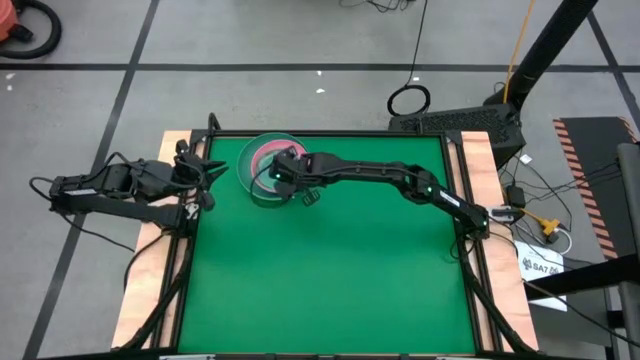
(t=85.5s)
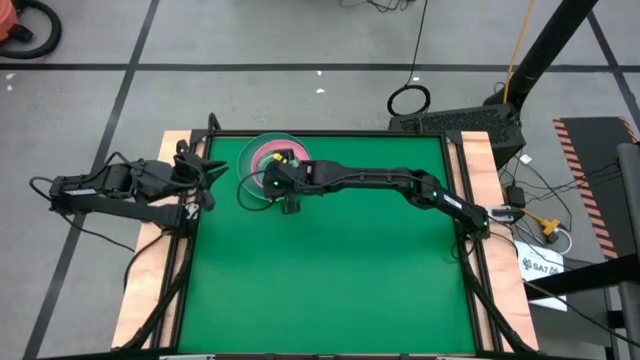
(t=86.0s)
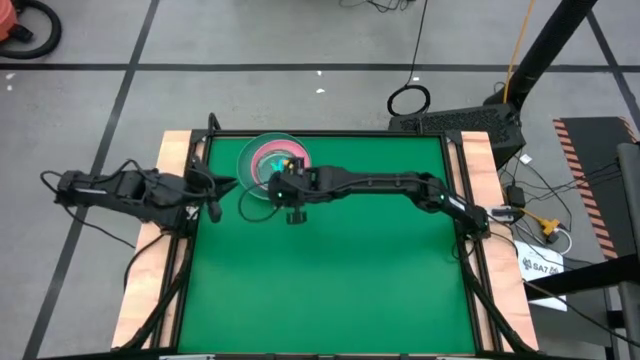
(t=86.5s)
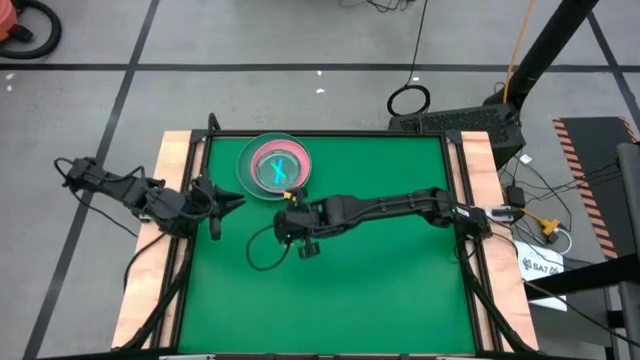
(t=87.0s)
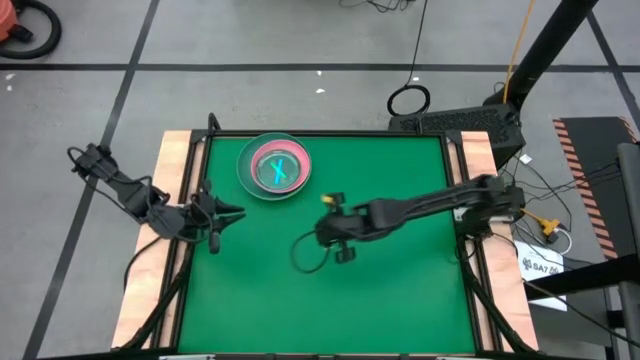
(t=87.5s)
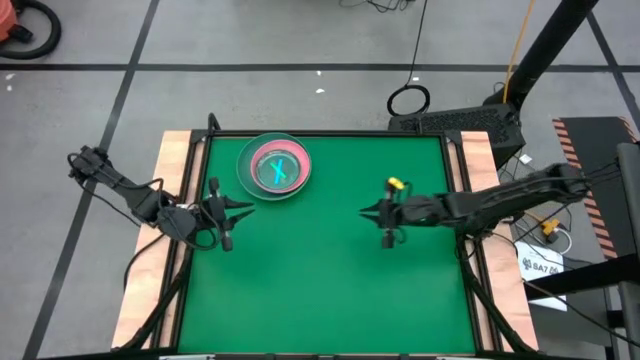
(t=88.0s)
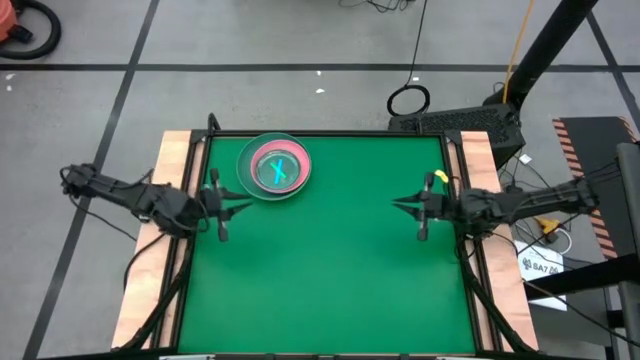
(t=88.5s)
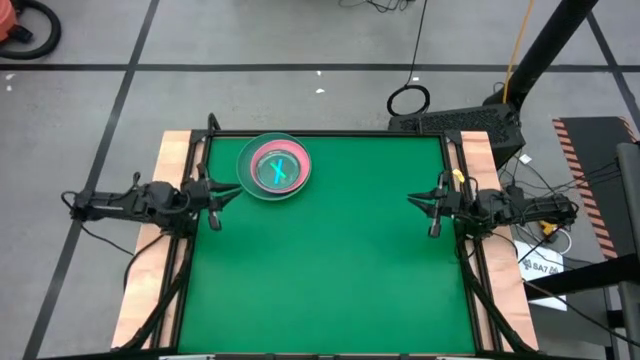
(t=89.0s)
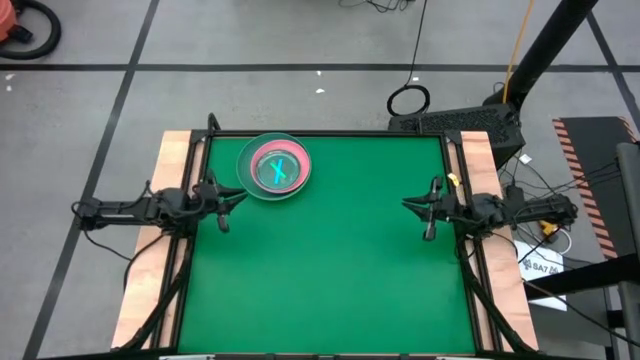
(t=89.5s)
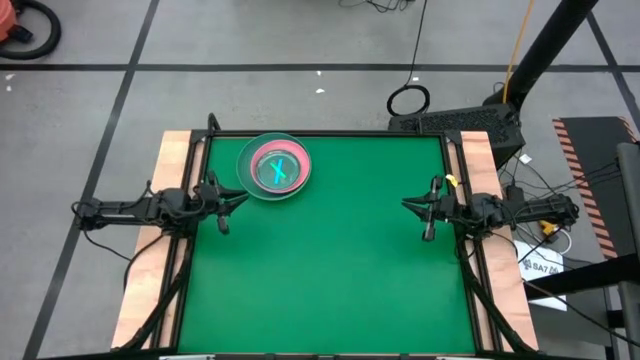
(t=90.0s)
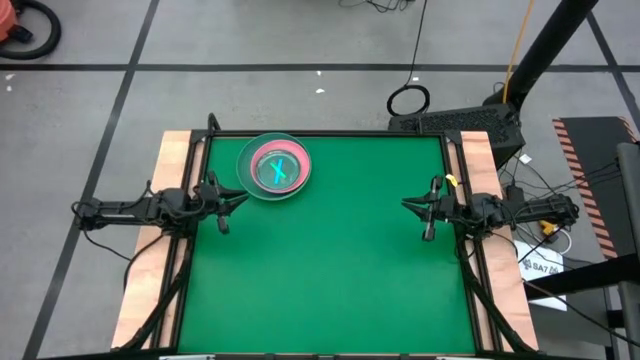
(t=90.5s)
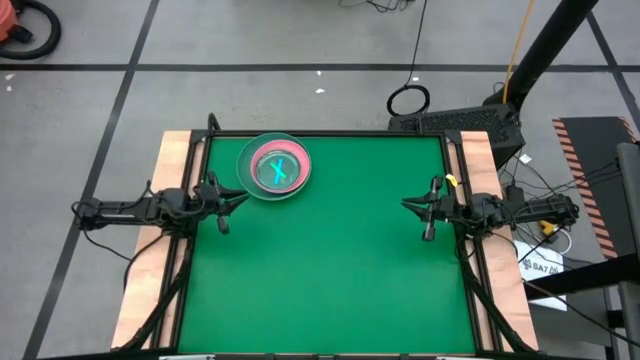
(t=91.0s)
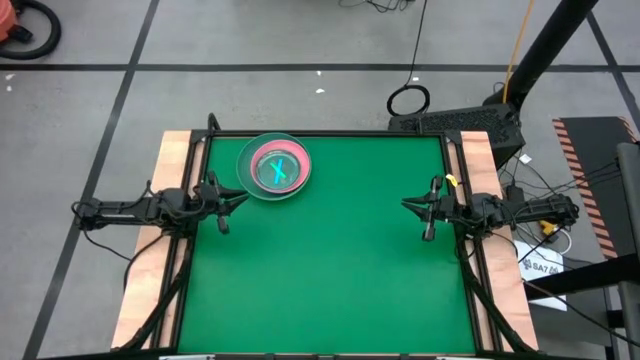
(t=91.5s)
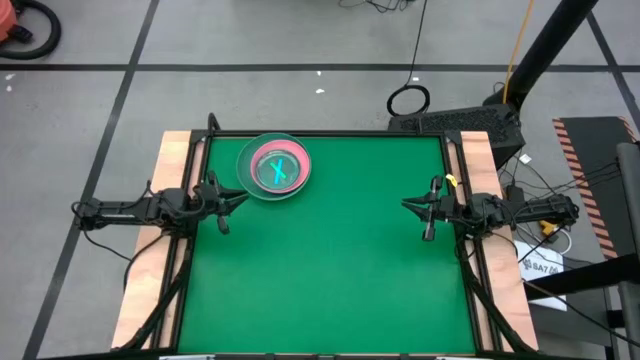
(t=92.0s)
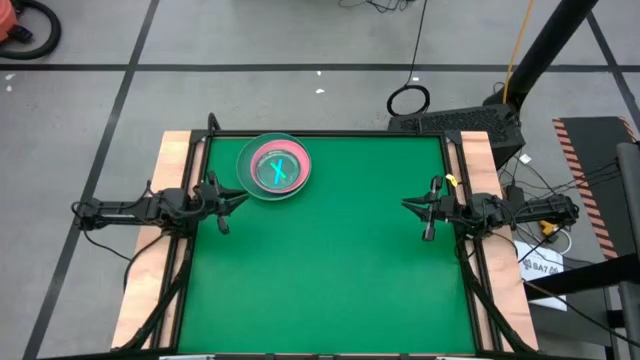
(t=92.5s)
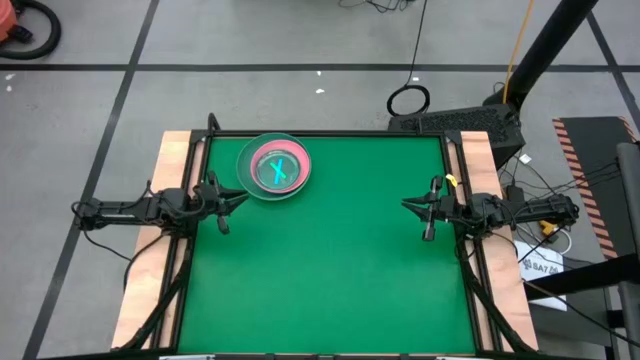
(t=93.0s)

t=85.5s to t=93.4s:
Task: Stack plastic plates
Return to Home Position

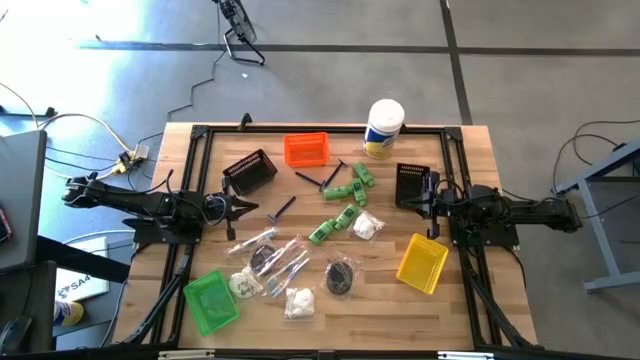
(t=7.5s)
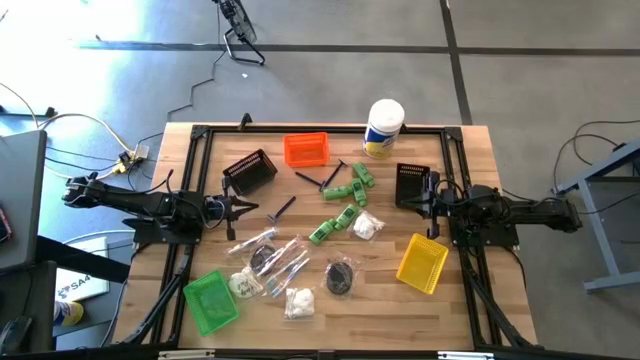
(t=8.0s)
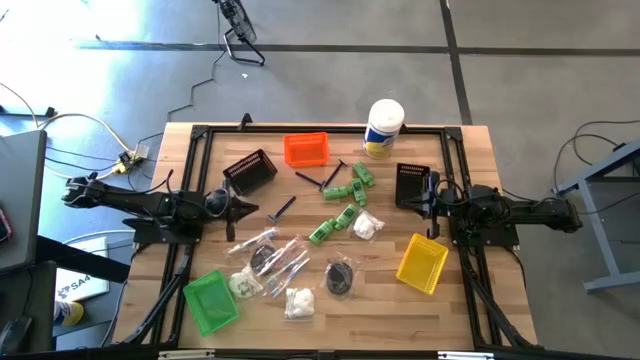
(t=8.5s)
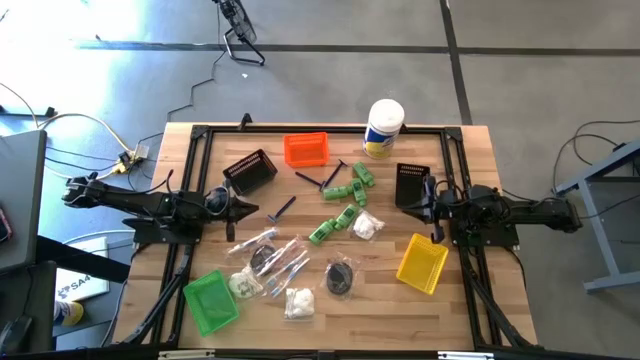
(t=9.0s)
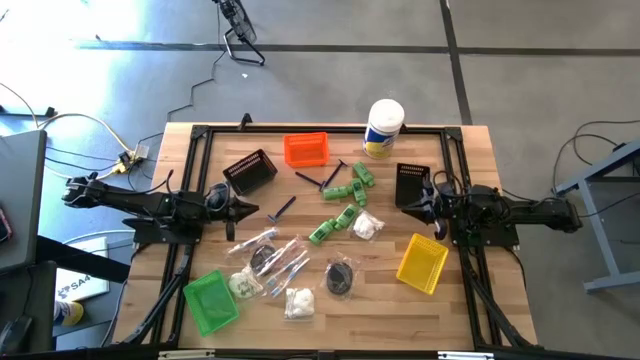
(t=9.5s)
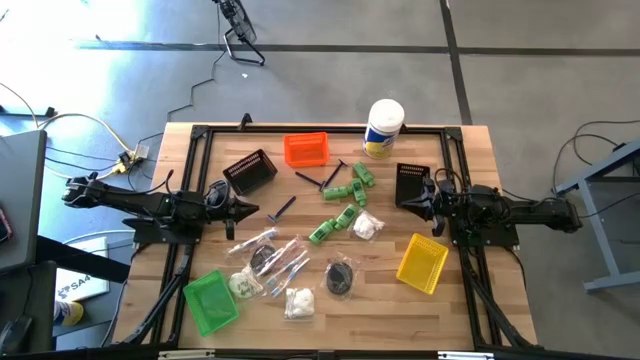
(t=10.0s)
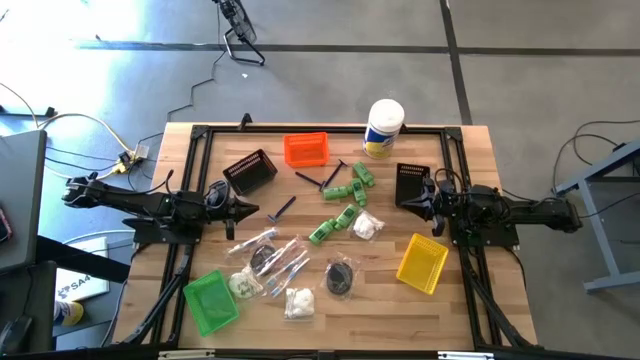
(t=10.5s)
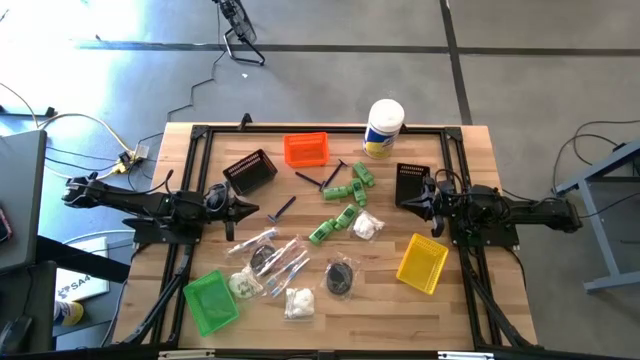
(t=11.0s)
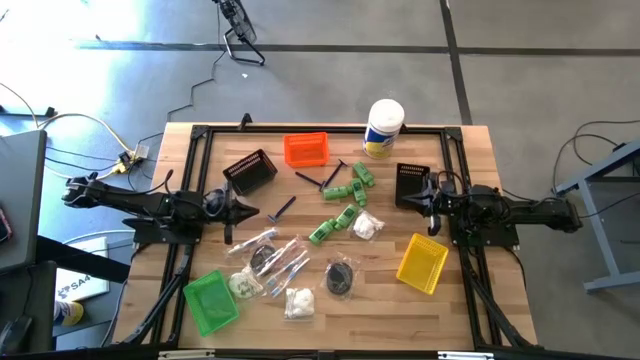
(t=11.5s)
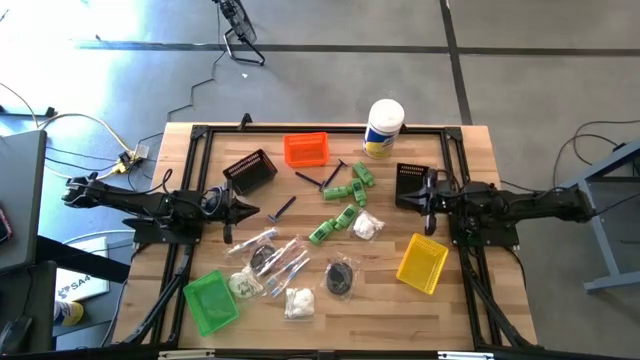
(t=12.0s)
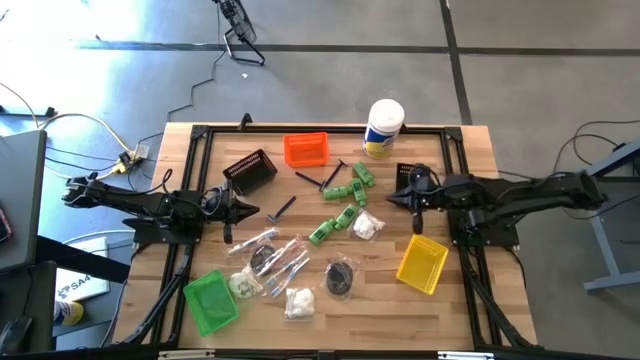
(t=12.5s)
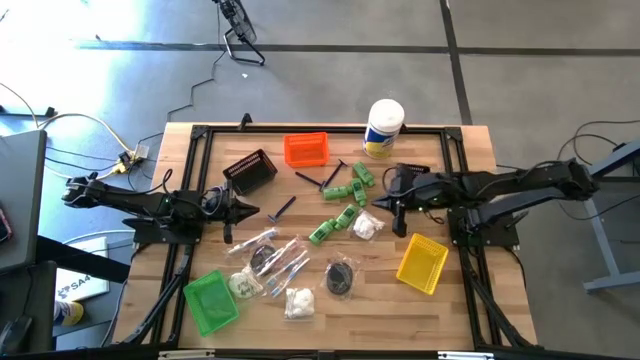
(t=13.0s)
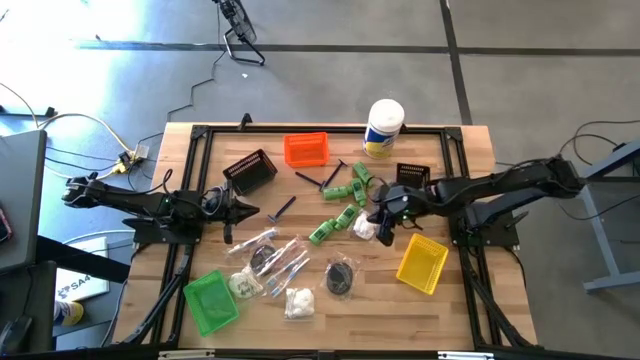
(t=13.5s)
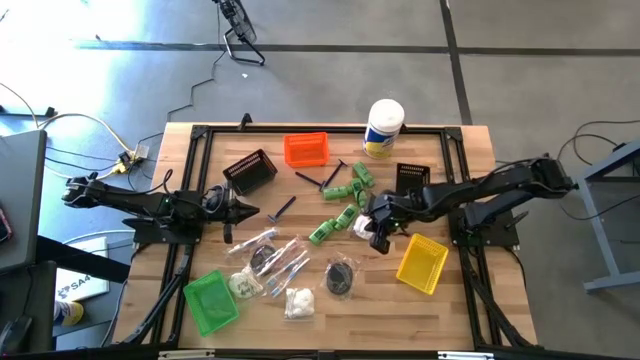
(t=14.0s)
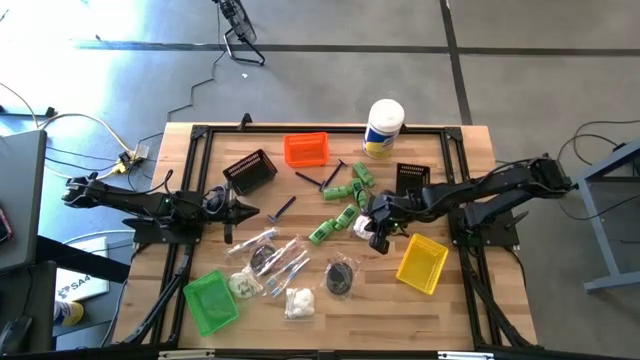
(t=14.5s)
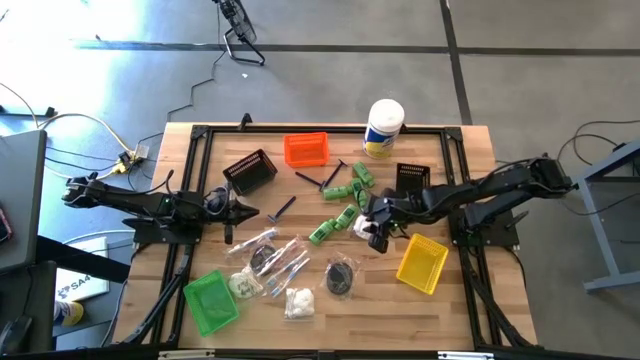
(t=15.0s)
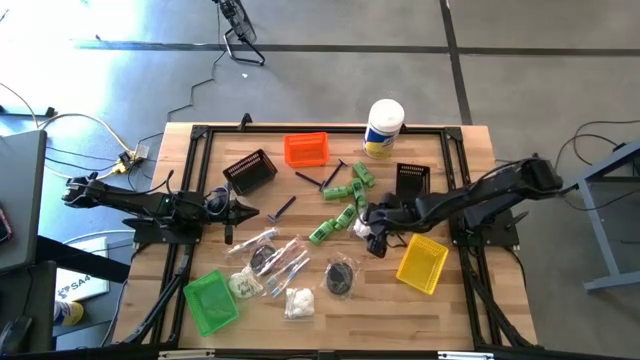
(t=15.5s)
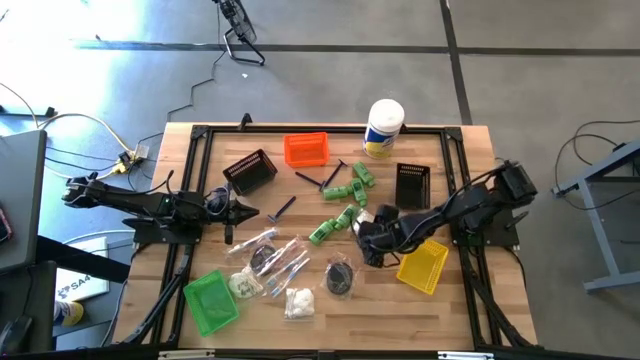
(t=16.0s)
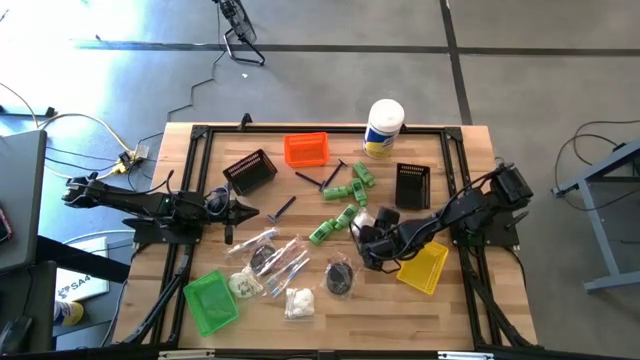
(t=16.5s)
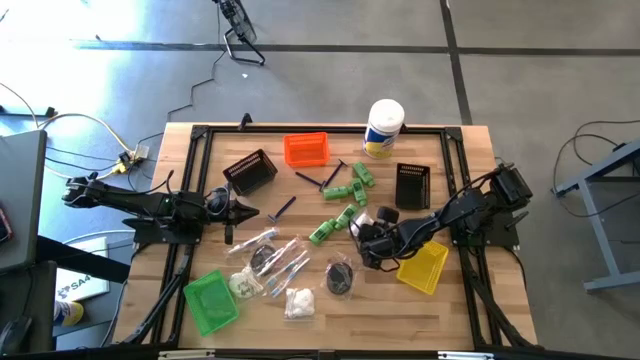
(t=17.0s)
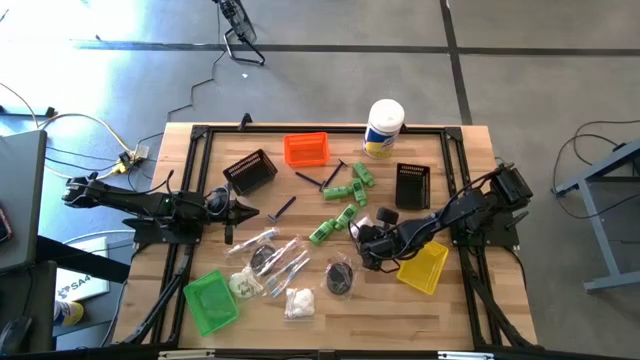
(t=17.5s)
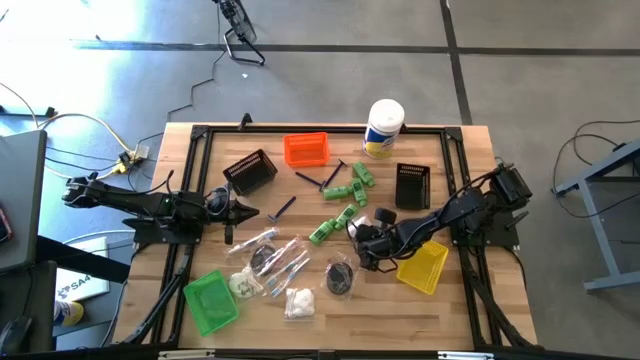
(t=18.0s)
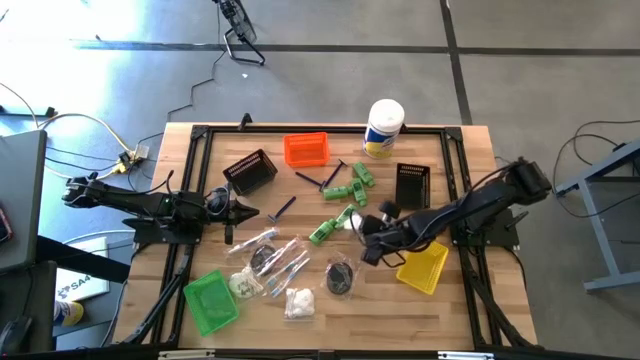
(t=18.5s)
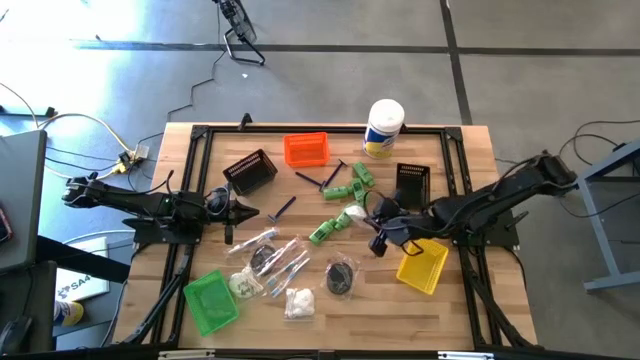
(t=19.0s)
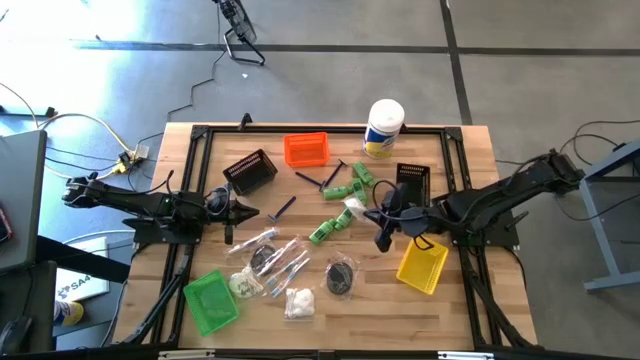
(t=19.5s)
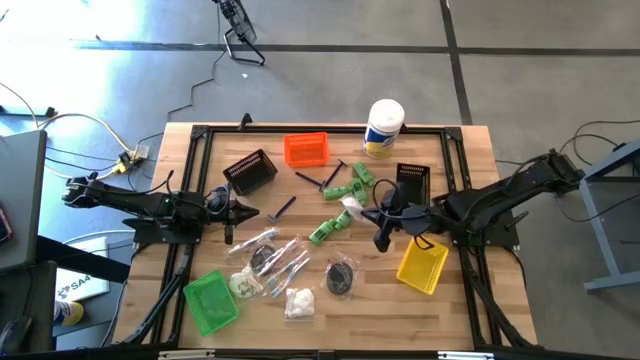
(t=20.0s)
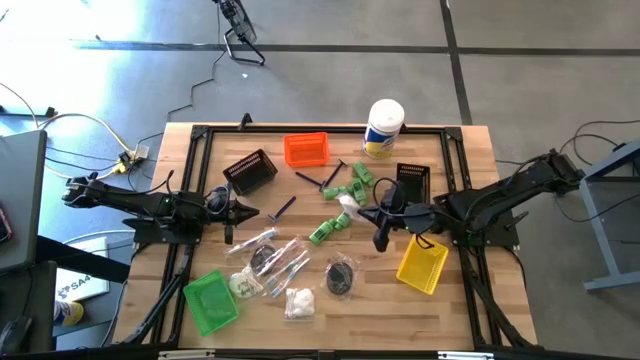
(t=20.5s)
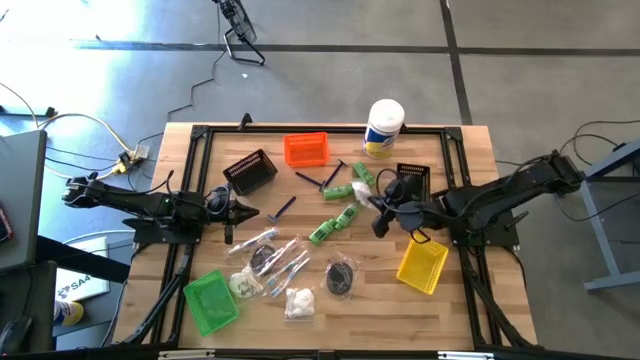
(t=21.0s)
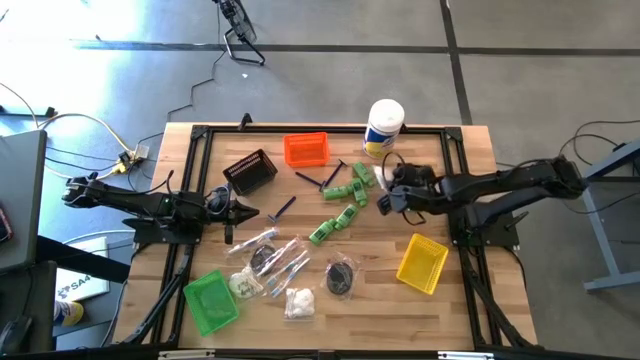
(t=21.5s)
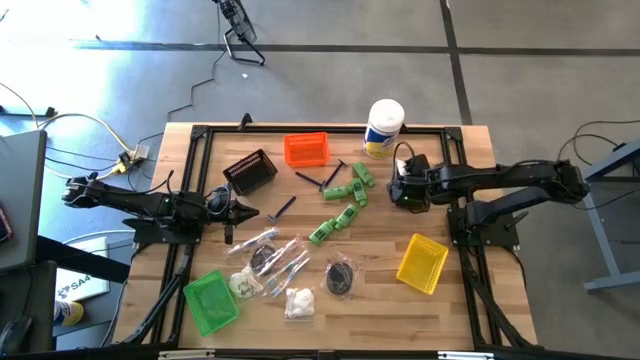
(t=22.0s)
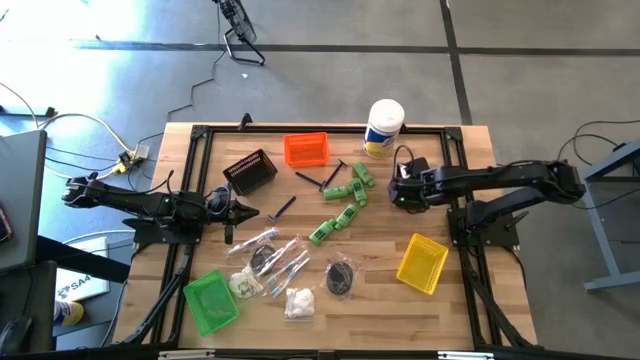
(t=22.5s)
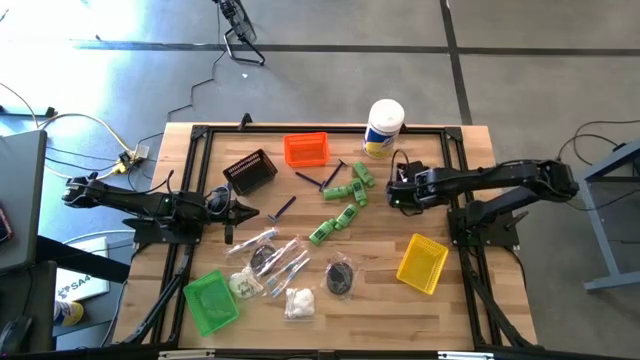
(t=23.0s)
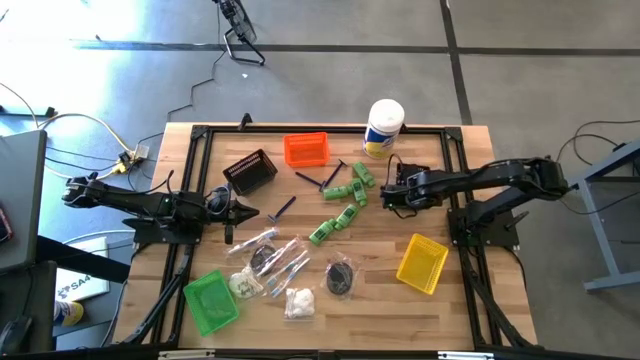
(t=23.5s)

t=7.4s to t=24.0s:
Task: Pick & Place Travel size toiletries
Put the white cotton pack into the right black bin
